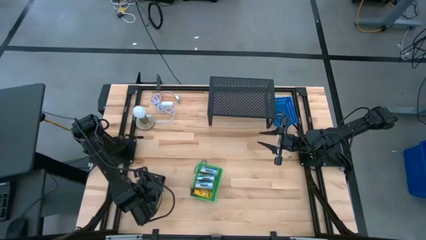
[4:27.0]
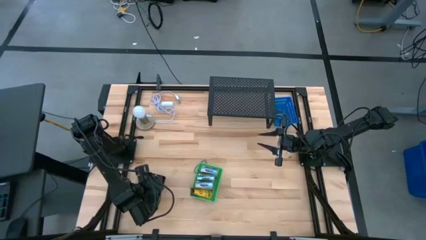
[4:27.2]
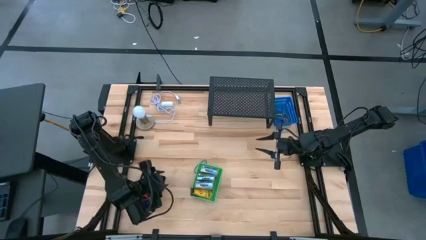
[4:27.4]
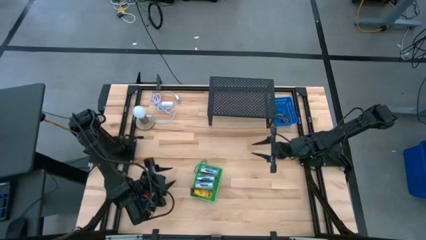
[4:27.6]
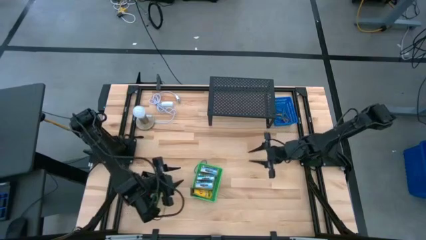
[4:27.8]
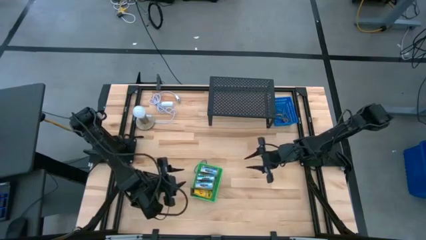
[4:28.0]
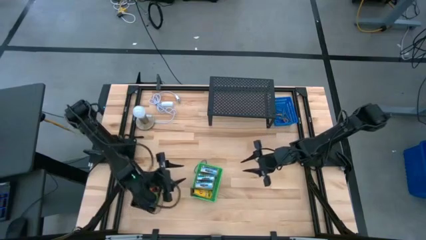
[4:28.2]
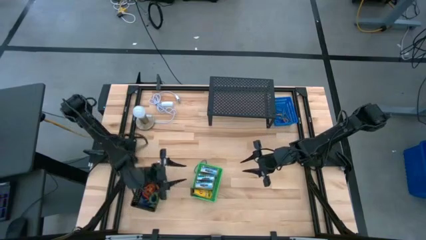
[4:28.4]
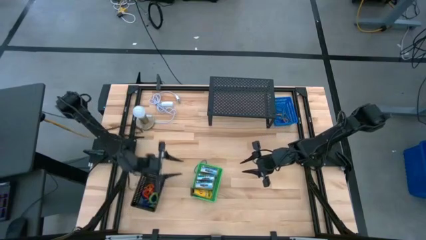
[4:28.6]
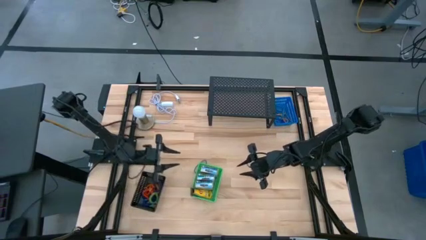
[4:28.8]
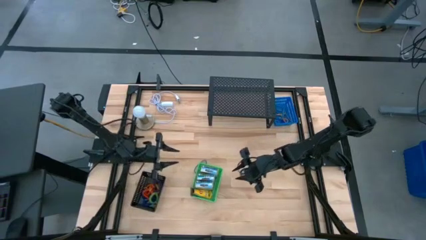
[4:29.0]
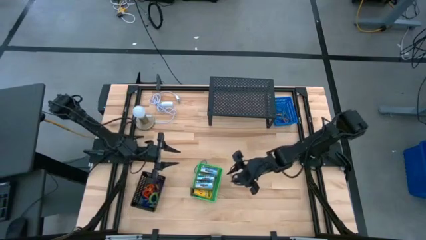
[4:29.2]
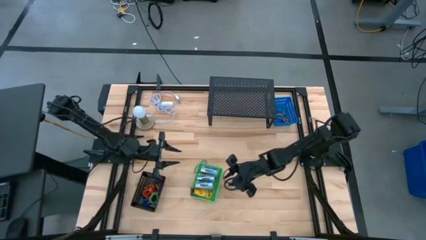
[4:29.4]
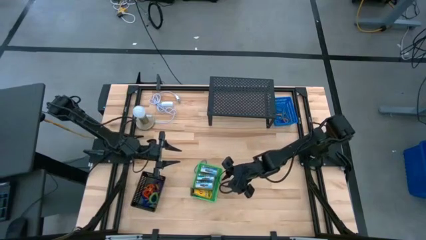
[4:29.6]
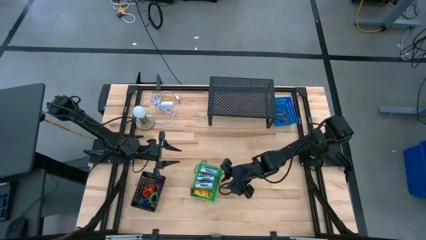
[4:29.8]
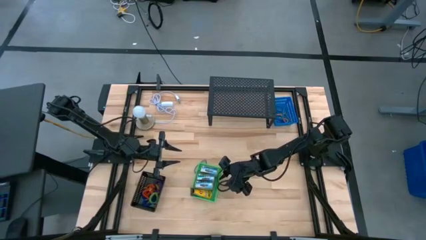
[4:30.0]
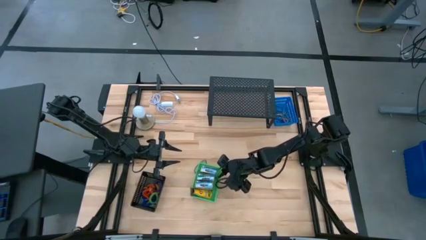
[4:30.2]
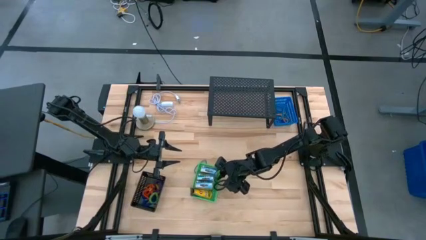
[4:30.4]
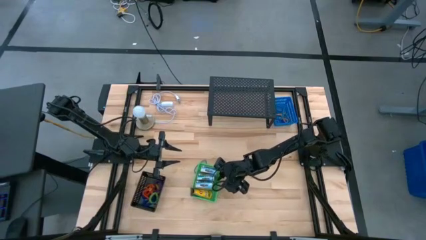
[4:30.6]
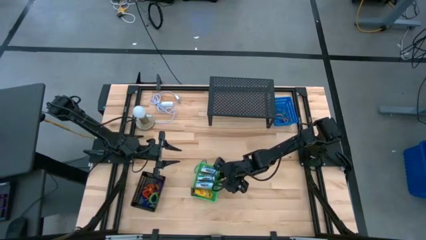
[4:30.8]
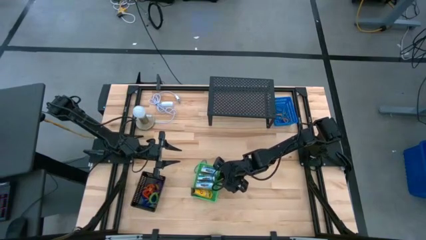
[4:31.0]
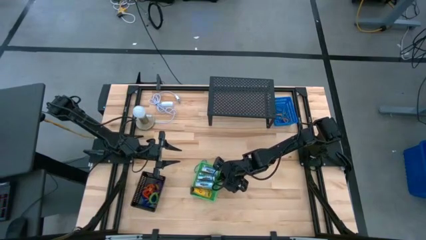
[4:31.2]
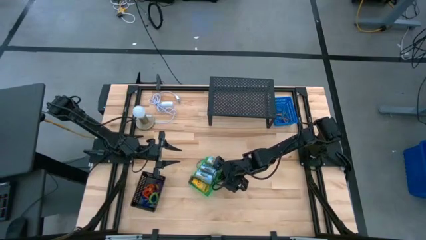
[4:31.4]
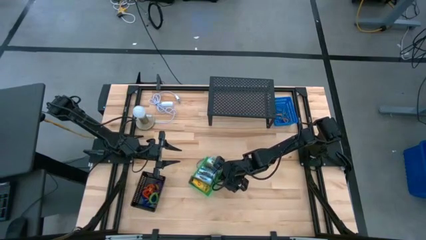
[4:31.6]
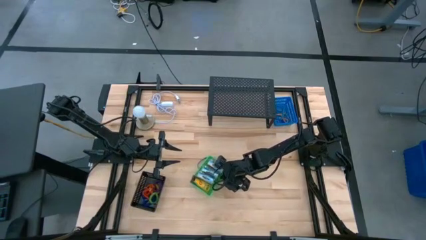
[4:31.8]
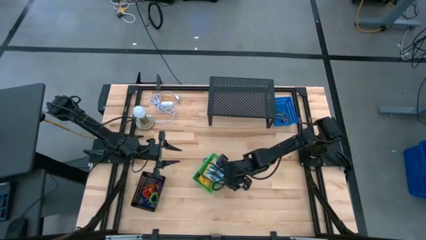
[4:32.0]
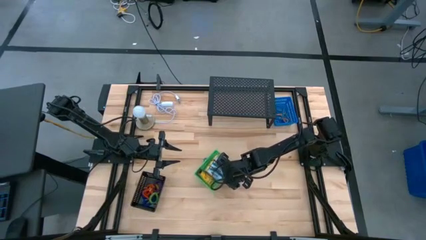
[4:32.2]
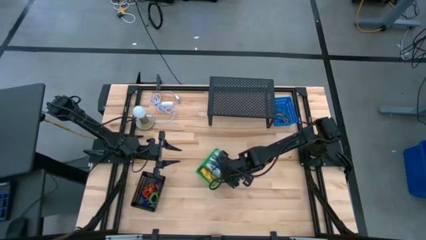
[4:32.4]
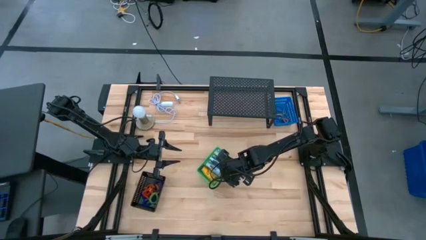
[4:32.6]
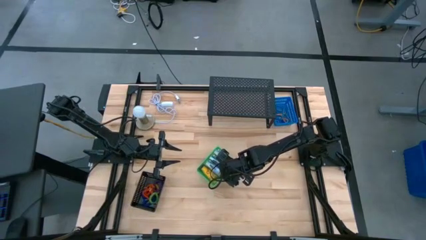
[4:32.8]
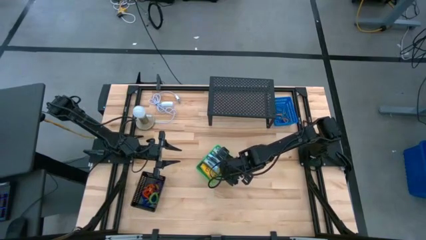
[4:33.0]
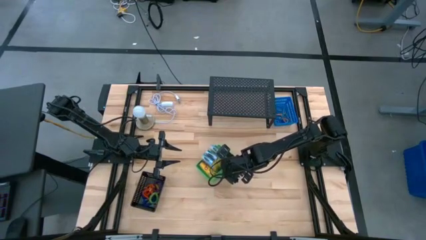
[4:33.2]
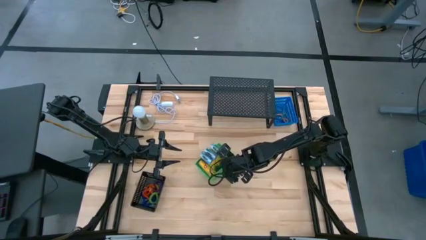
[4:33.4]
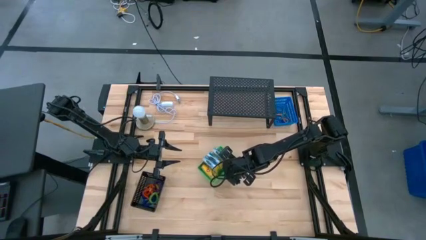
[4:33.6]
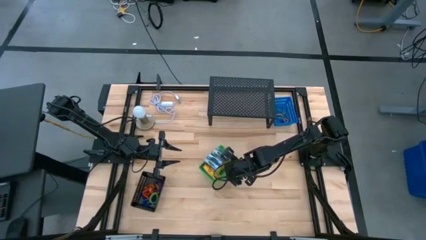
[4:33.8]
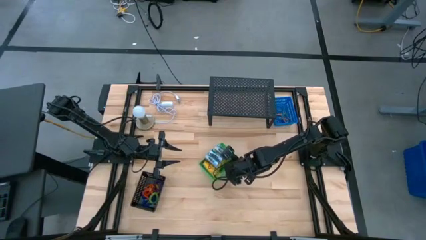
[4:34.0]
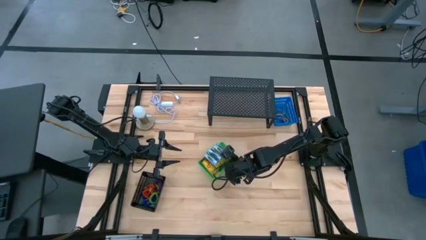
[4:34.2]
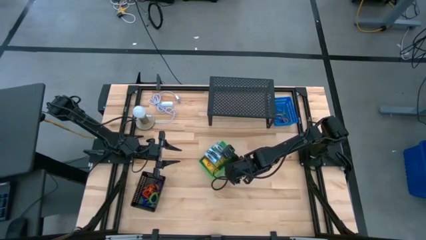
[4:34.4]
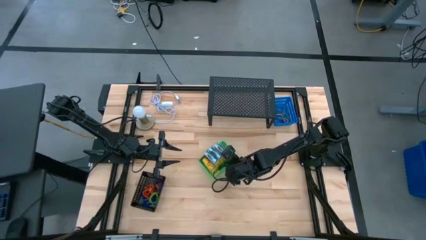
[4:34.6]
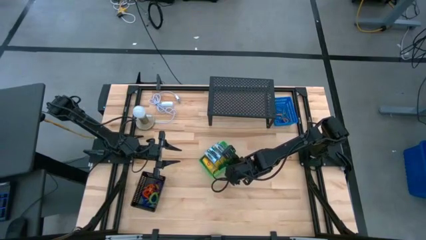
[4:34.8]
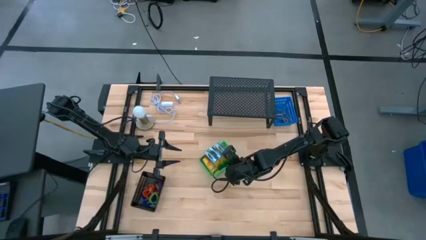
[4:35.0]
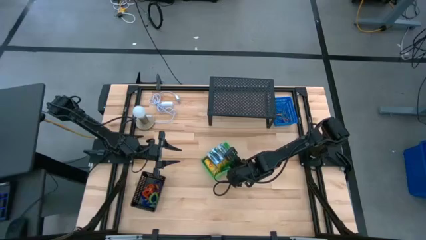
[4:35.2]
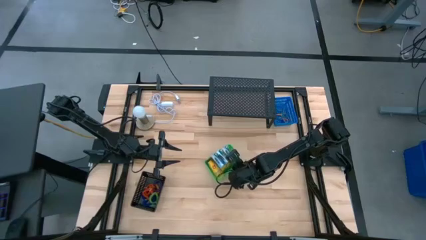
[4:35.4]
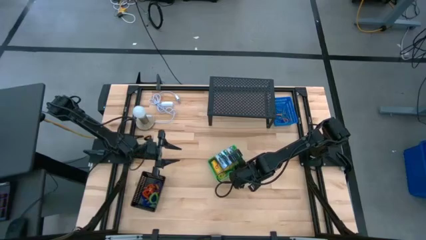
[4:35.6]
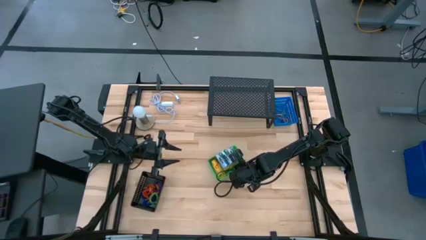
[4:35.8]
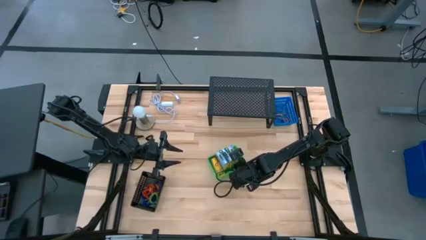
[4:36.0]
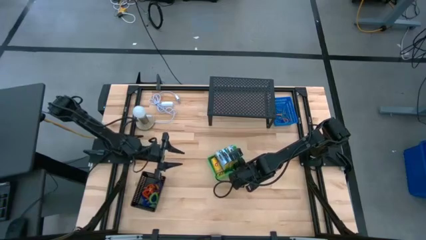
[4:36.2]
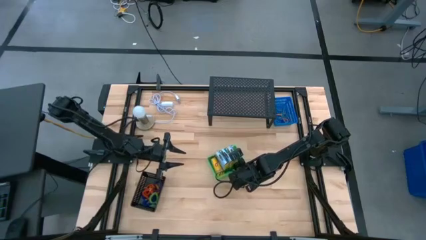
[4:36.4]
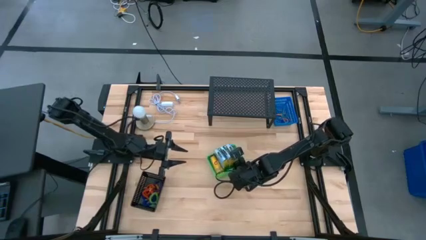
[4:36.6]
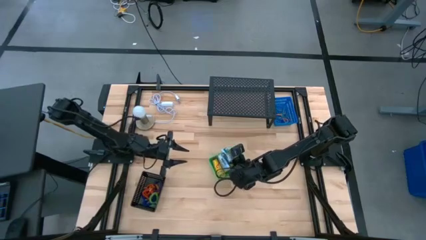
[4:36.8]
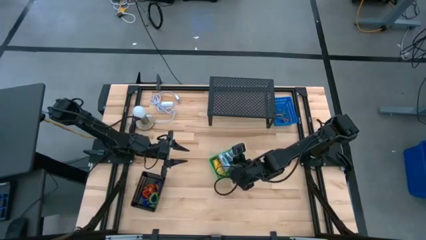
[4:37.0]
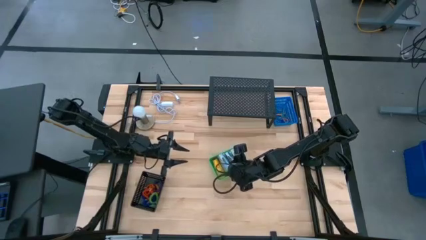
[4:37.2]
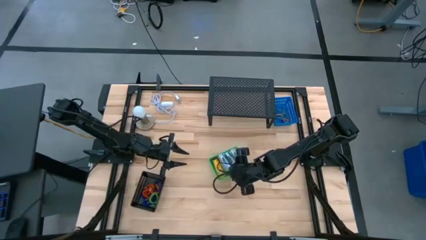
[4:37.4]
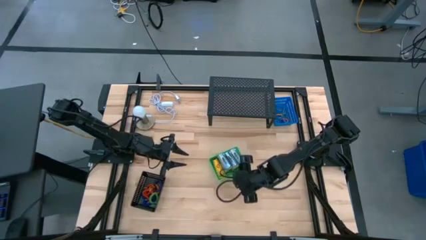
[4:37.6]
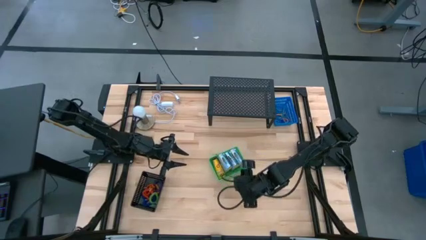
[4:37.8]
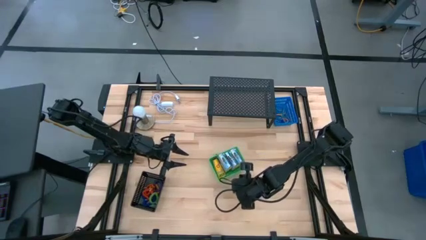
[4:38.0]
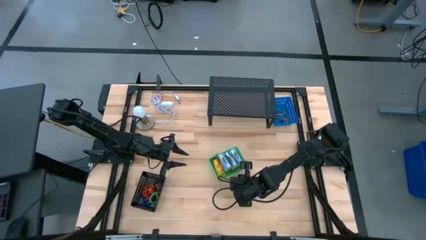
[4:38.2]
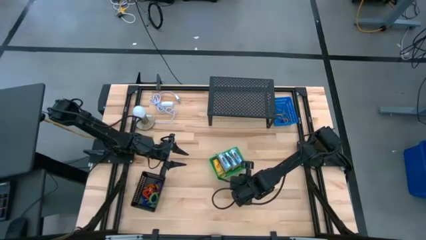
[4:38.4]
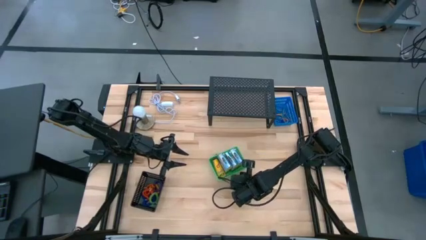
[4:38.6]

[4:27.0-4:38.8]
Task: Pick & Place Office Desk Supplies
Put the green bin on the shelf
